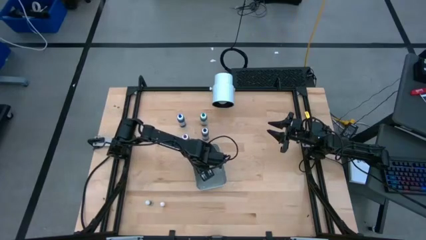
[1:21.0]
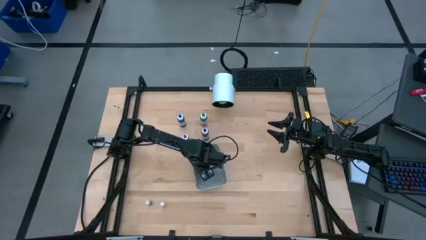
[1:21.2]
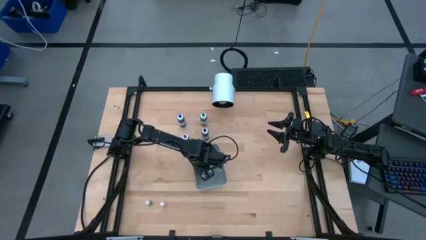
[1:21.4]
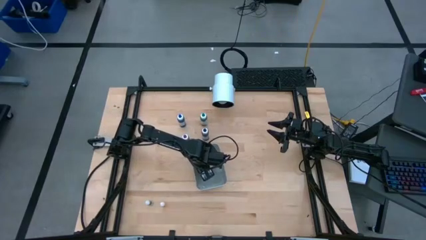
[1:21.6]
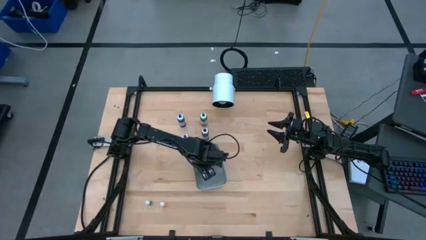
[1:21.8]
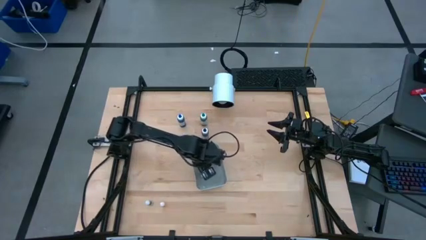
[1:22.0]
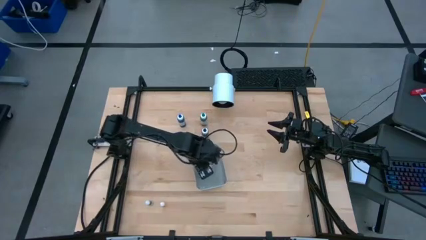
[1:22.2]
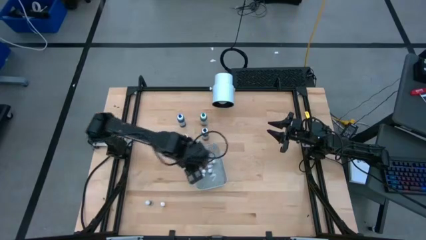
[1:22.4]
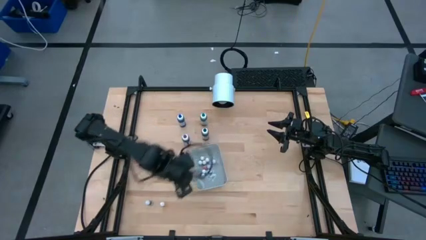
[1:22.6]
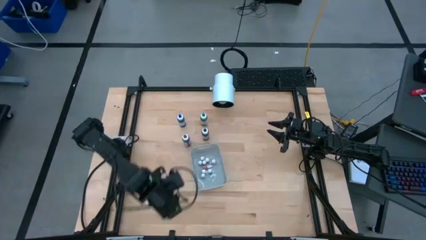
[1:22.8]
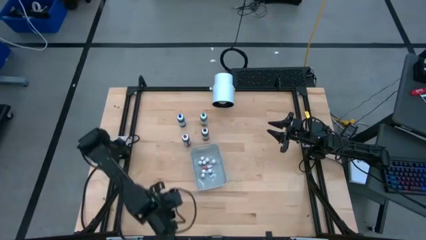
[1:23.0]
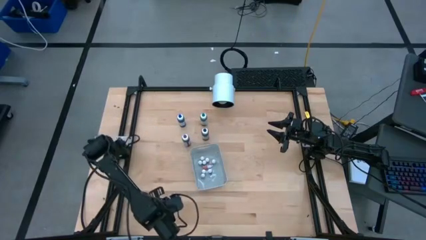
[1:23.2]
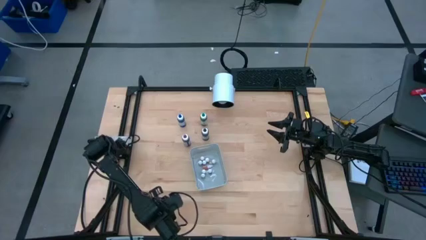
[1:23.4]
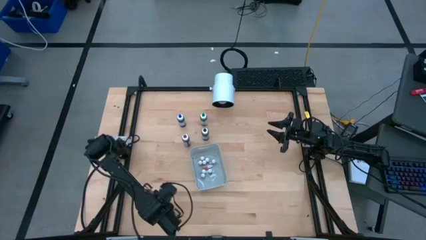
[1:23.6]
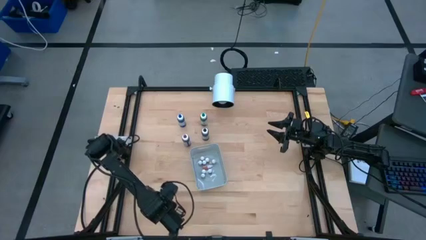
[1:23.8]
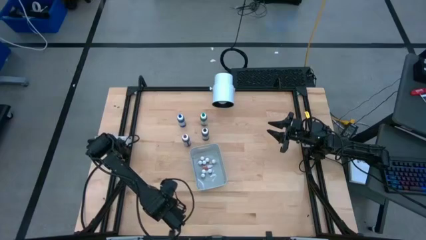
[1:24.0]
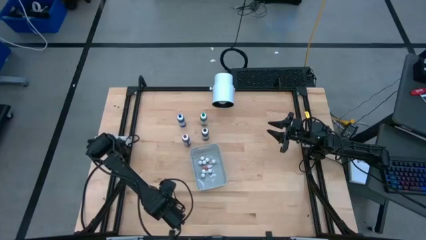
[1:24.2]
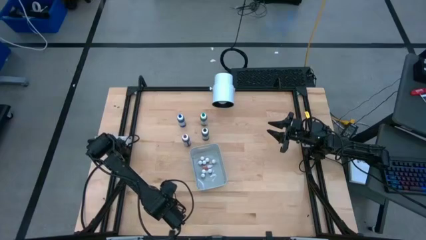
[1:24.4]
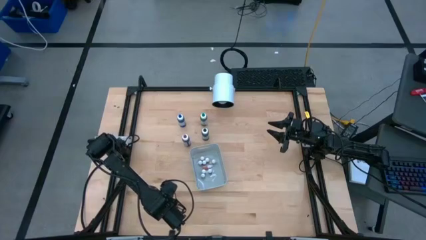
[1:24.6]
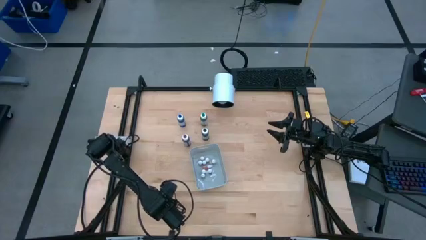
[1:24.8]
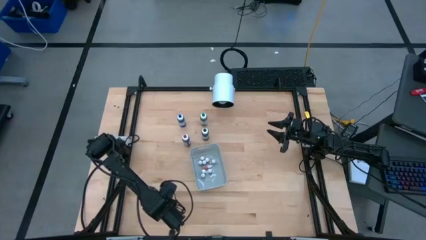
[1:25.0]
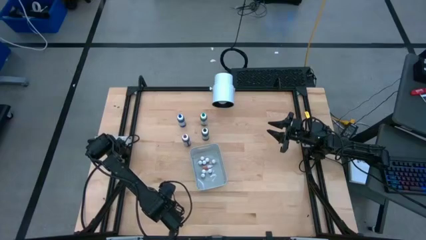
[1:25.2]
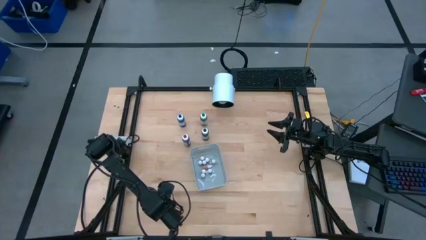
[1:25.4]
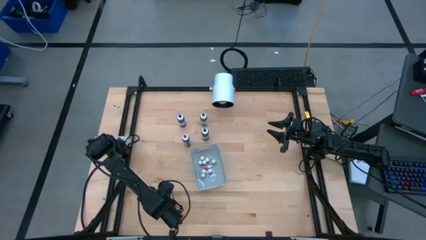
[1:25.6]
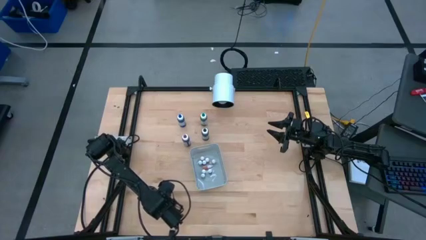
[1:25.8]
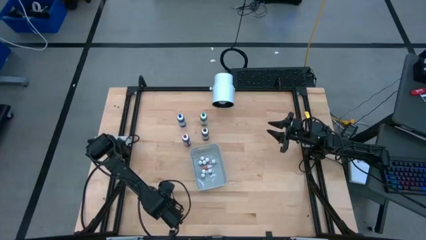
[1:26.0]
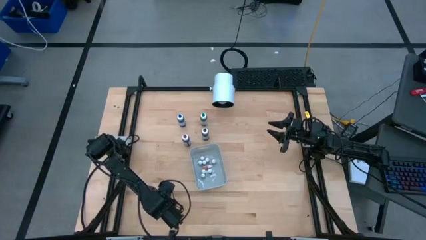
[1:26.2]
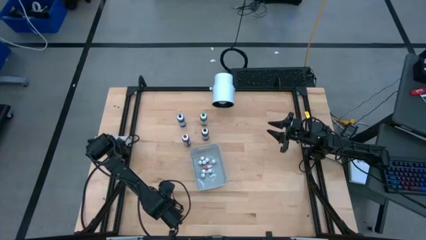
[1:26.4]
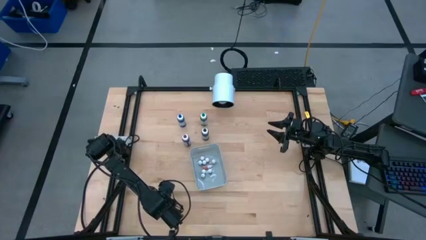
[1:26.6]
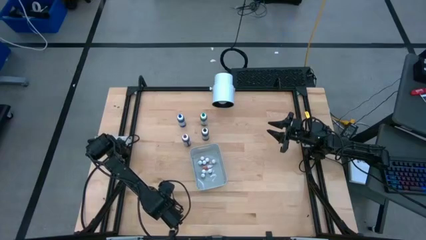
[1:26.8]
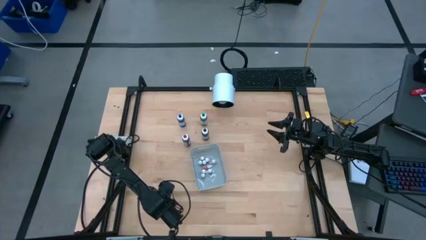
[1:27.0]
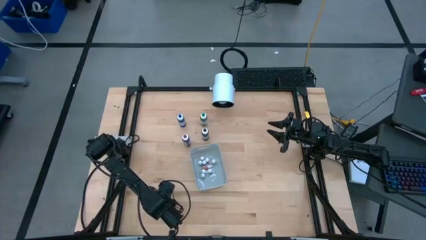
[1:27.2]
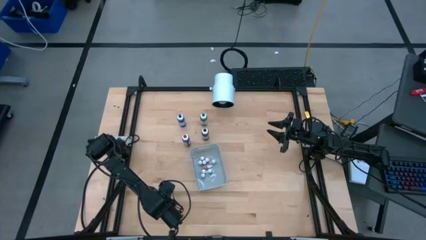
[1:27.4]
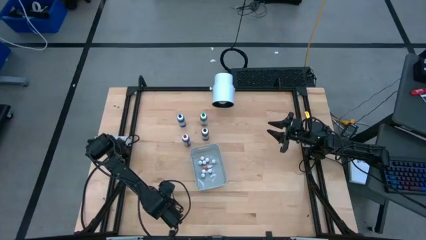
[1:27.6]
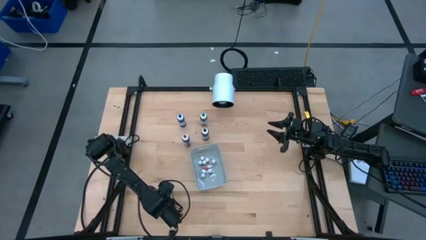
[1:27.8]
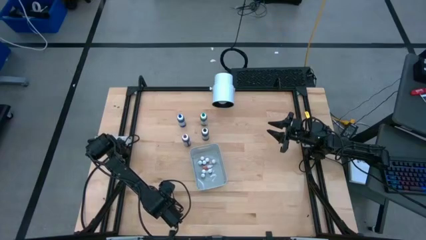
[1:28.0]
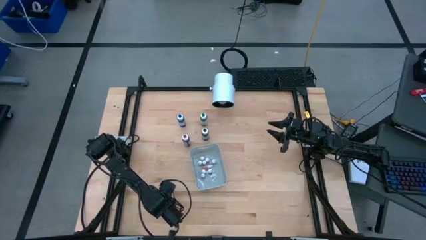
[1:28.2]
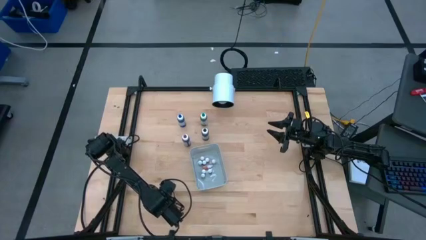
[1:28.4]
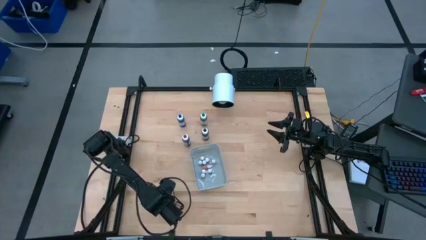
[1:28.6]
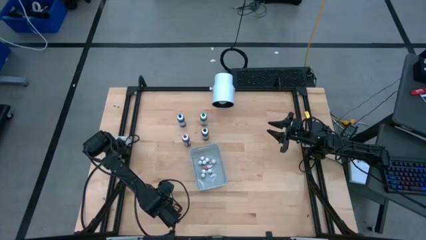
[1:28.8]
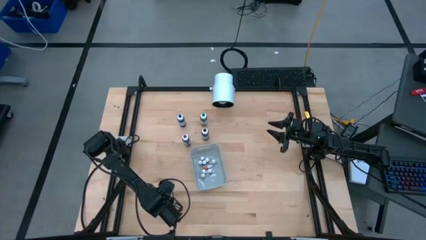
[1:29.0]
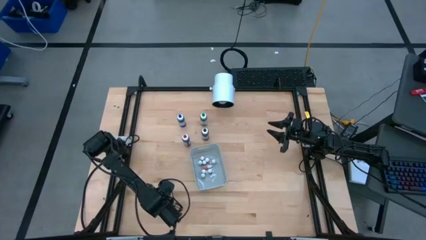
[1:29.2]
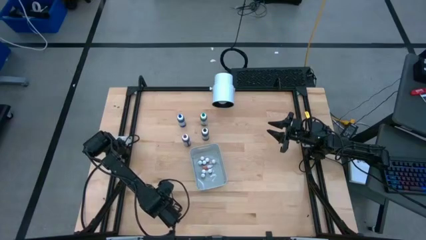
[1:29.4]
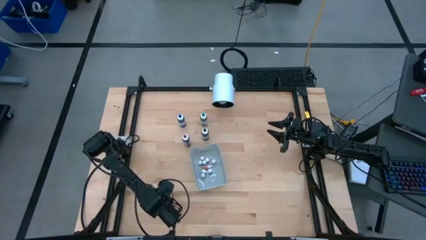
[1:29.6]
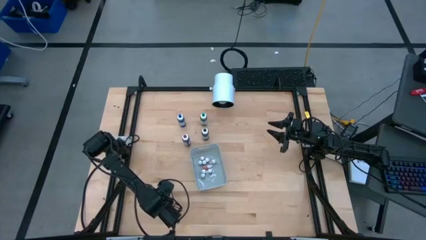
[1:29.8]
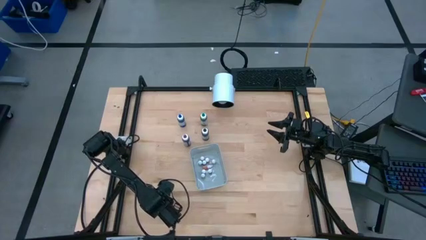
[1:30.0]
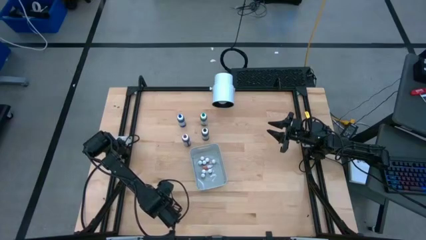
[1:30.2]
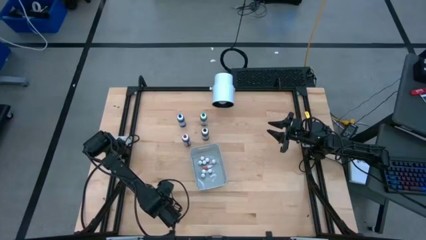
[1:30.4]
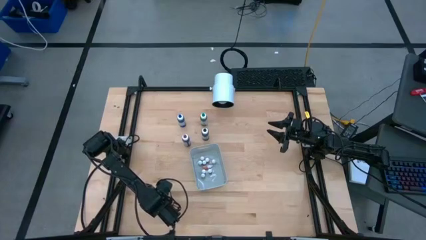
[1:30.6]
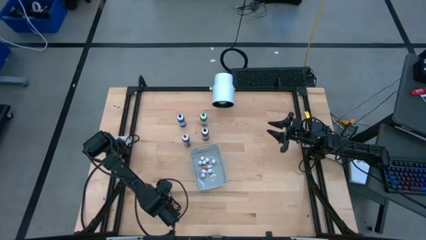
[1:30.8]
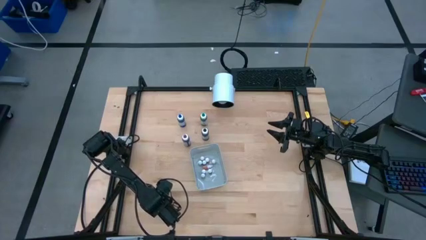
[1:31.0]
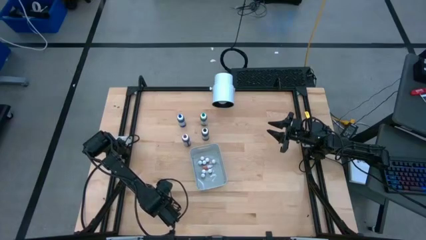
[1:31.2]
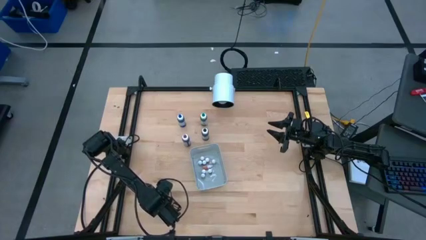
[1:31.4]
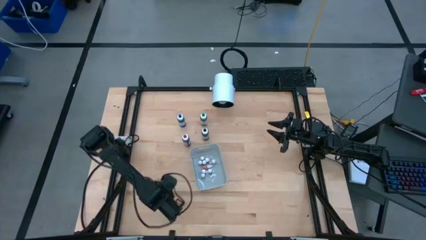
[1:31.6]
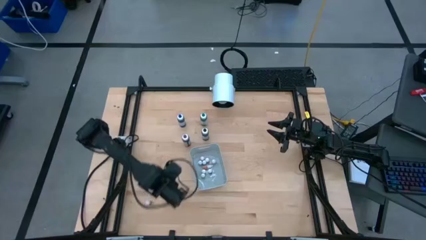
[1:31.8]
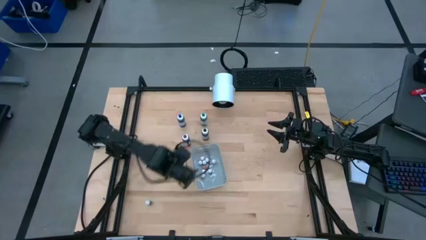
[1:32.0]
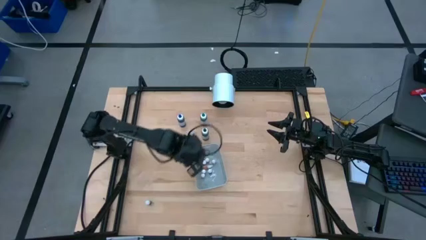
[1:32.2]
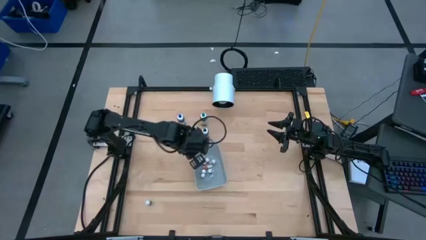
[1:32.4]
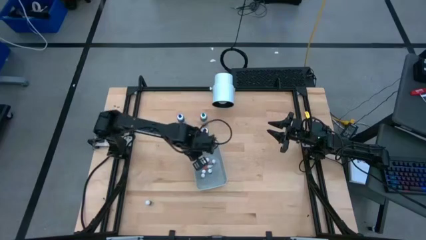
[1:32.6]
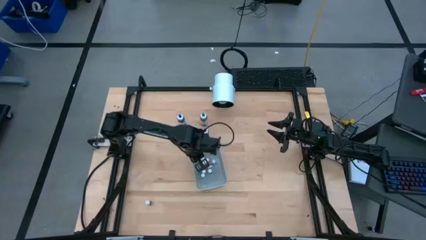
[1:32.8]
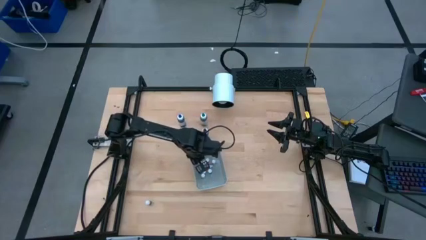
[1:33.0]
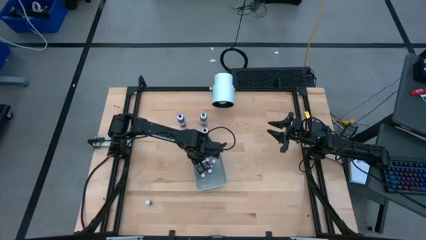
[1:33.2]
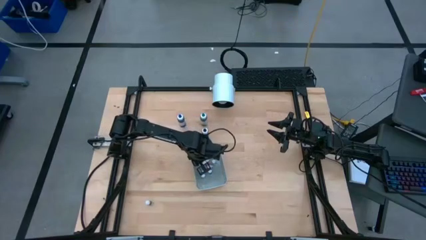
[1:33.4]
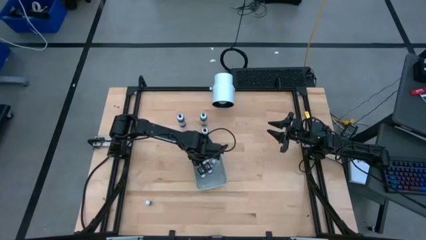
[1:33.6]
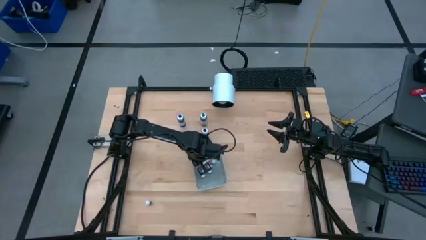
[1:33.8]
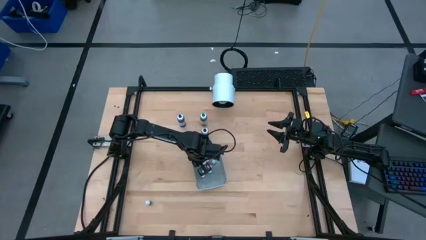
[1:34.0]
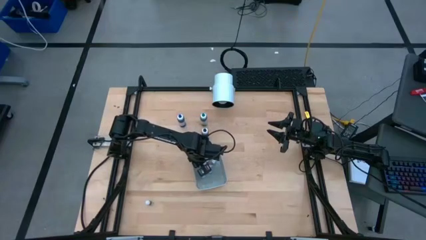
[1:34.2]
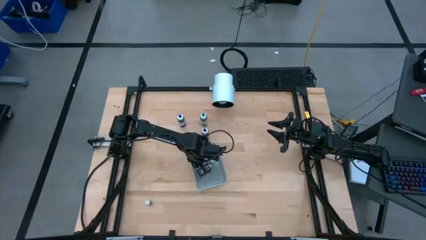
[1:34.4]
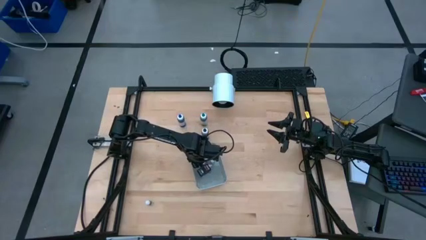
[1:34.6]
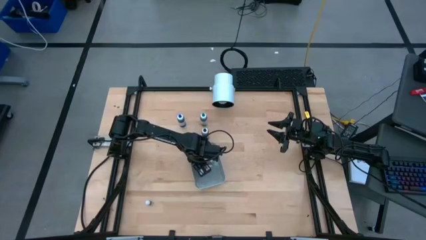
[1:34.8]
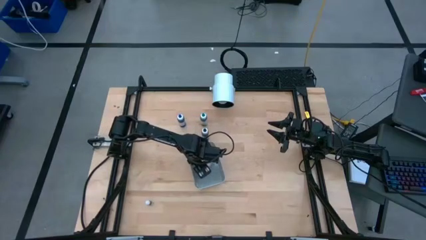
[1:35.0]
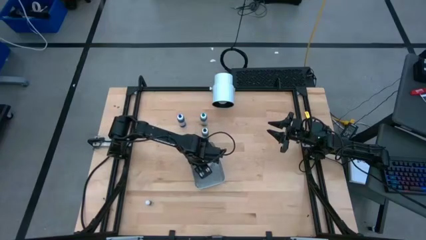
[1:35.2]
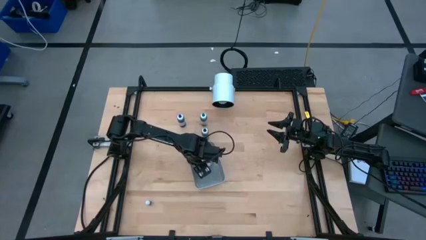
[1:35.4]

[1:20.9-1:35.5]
Task: Pick & Place food coloring
Put the small orange food coloring bottle into the gray bin

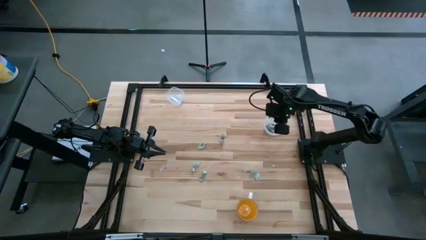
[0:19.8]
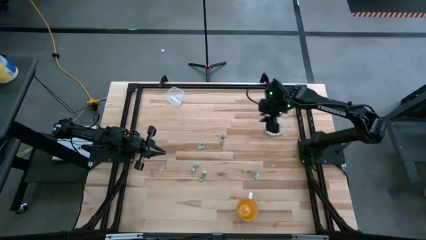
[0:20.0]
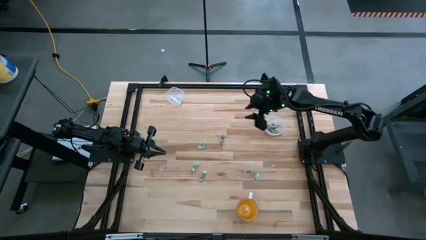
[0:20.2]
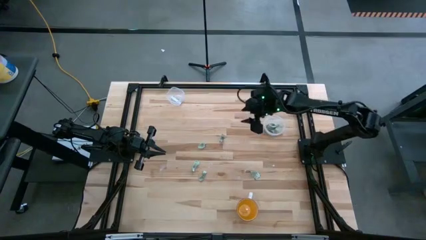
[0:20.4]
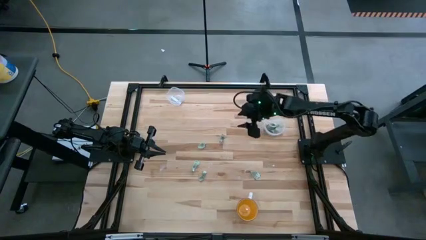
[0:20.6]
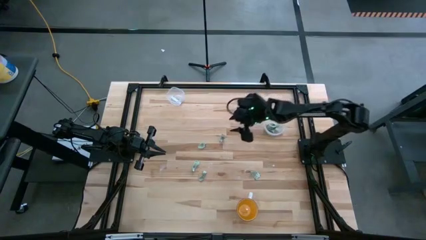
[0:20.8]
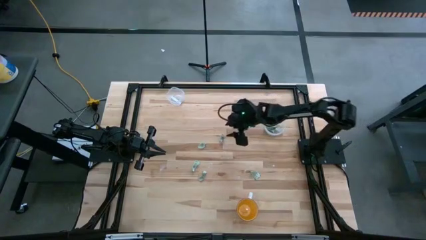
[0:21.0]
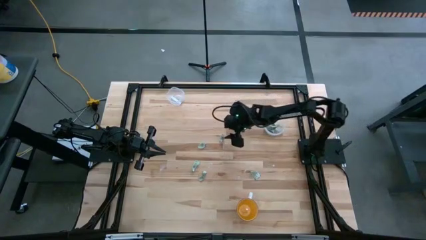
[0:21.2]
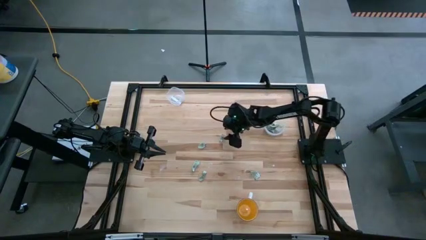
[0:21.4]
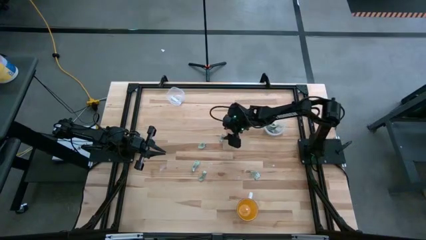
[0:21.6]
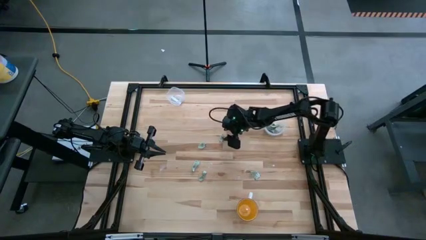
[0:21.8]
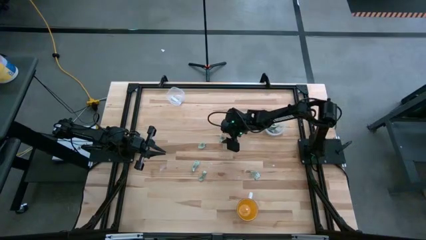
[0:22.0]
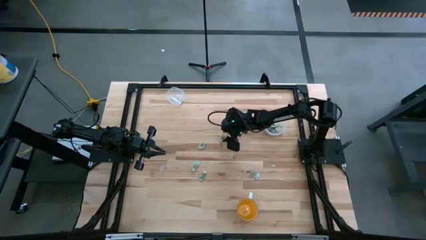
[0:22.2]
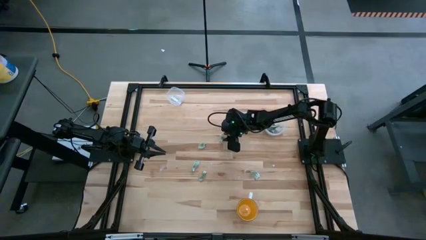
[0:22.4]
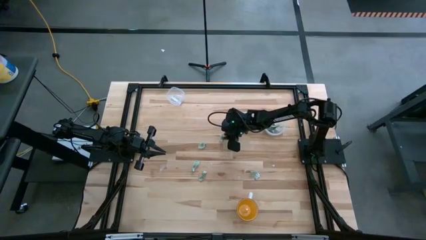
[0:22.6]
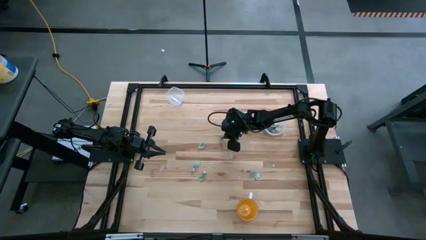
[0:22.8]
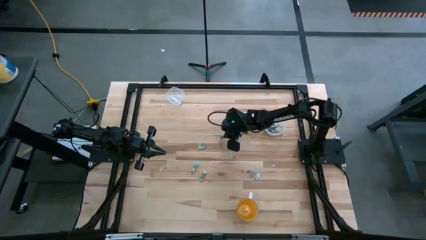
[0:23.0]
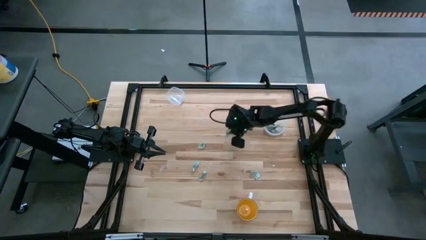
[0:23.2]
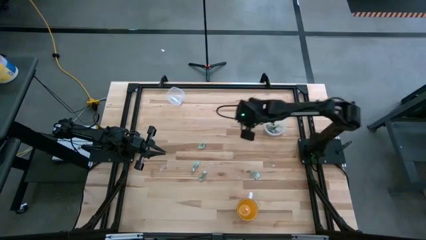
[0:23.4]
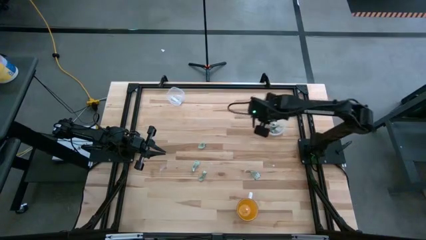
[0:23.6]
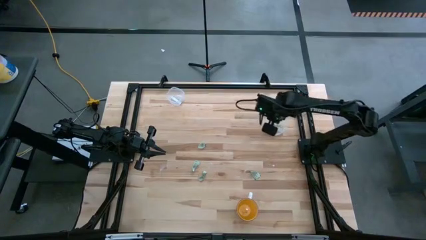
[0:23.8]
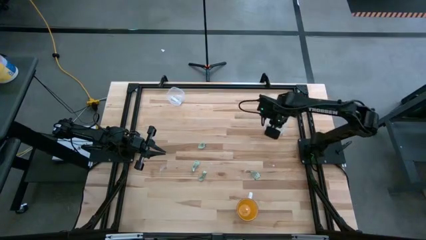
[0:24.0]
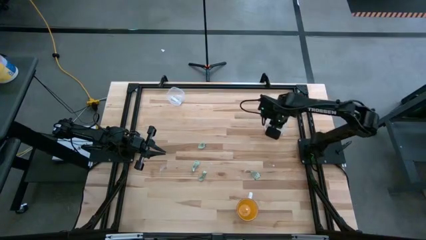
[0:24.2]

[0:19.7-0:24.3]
Task: Pick and place items into bin
Put the stevia packet into the bottom transparent bin
